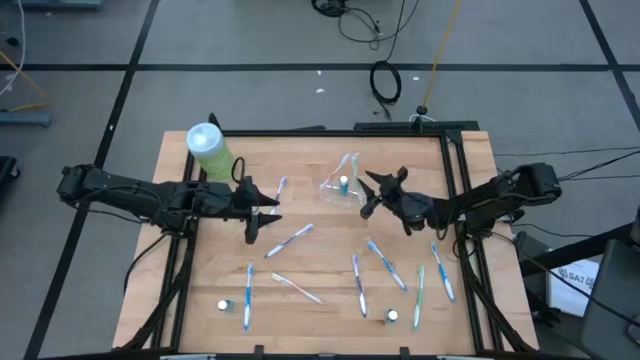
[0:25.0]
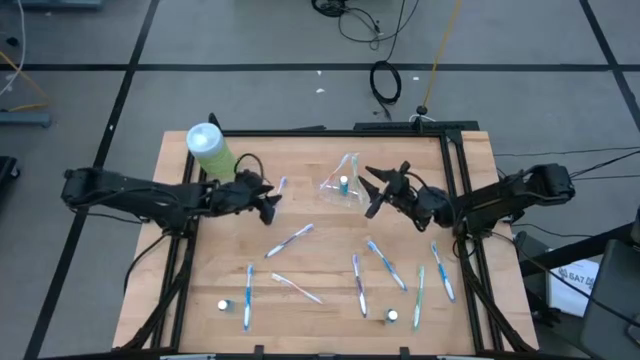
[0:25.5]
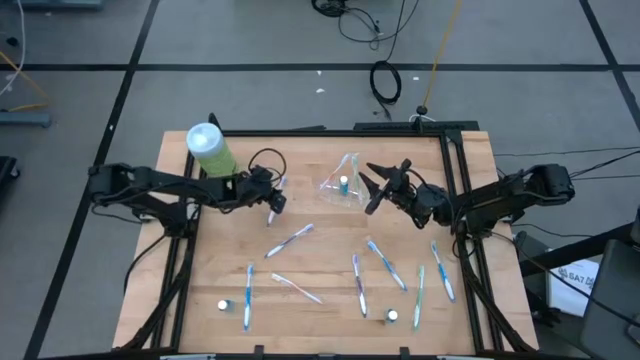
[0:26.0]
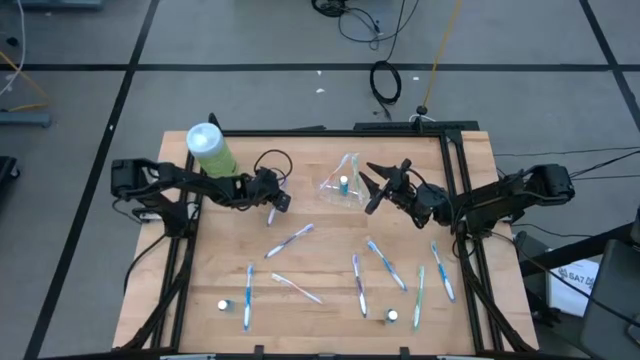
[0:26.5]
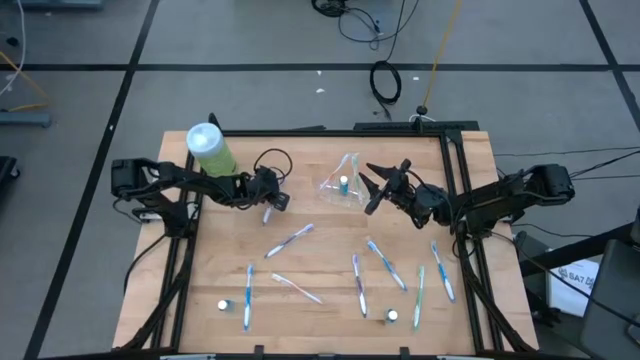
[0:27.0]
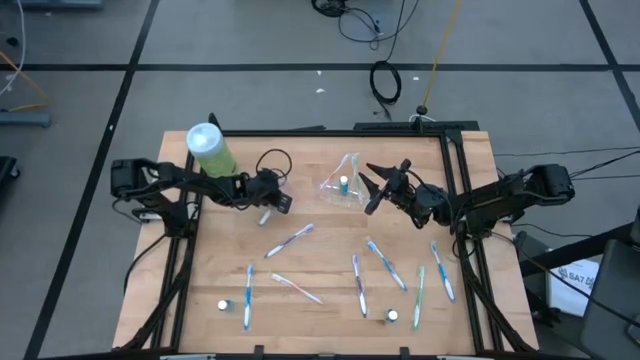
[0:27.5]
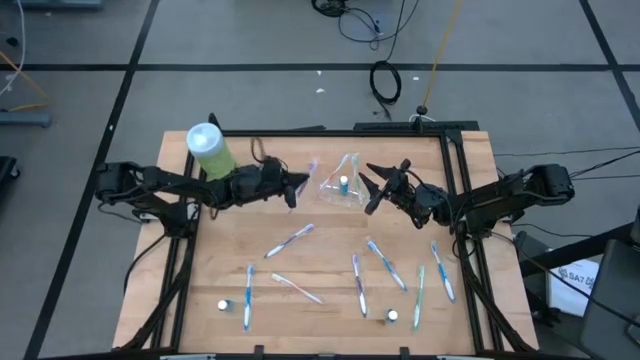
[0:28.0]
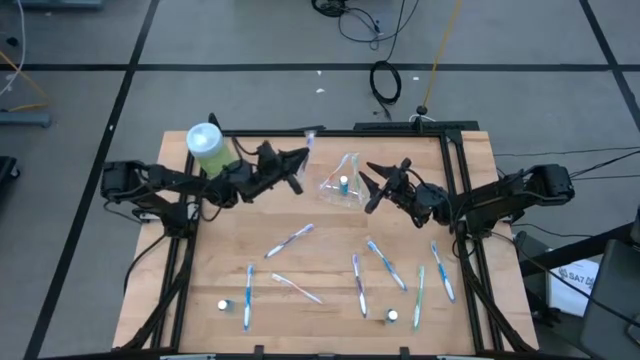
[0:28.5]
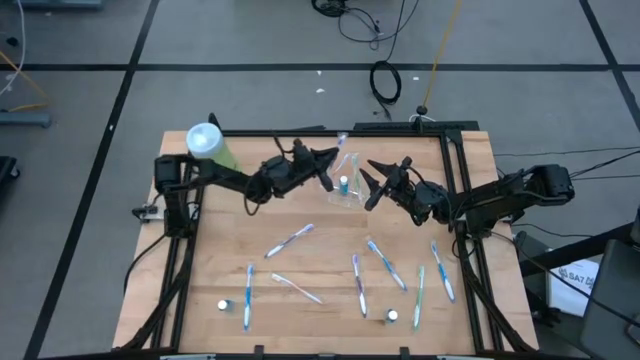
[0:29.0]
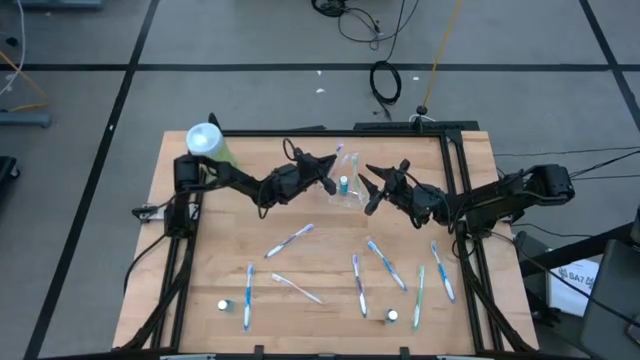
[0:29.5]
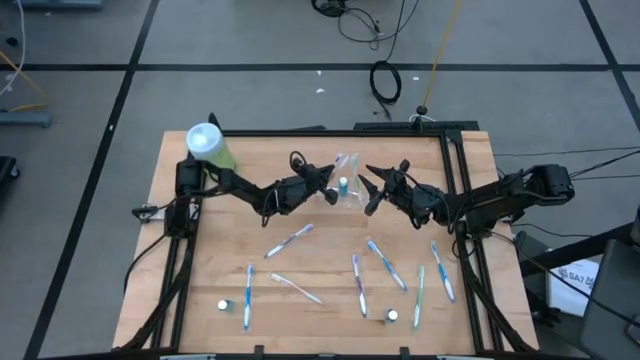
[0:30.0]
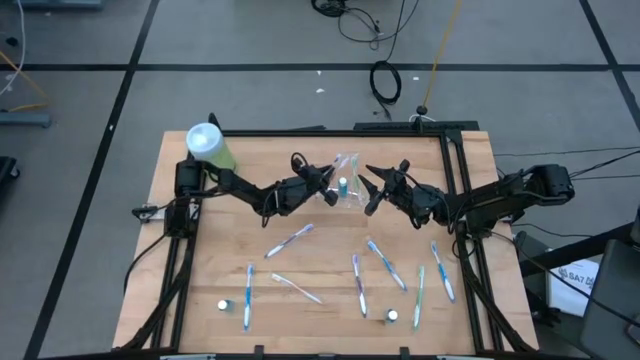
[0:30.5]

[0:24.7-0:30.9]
Task: Pick & Place toothbrushing station
Put the top violet toothbrush into the transparent organizer

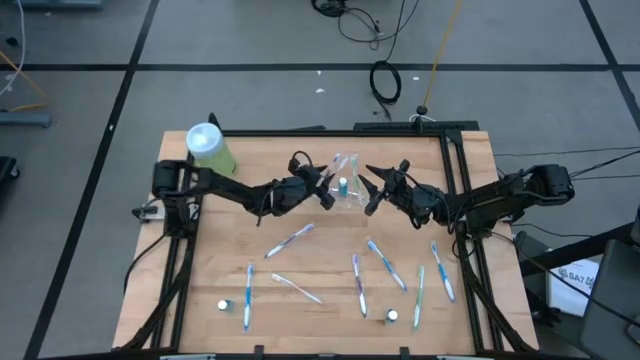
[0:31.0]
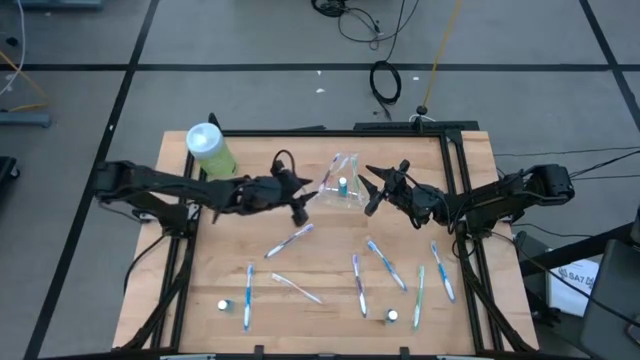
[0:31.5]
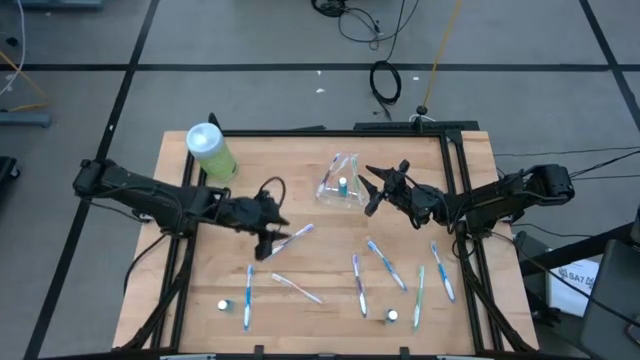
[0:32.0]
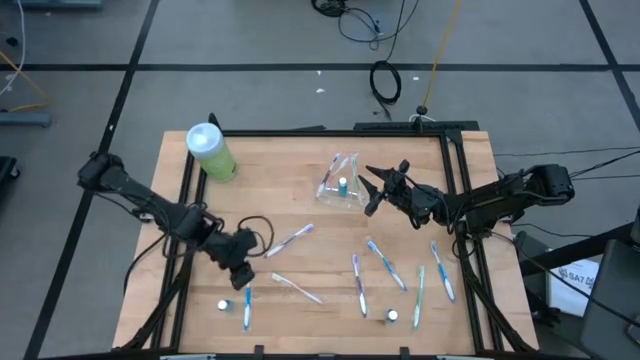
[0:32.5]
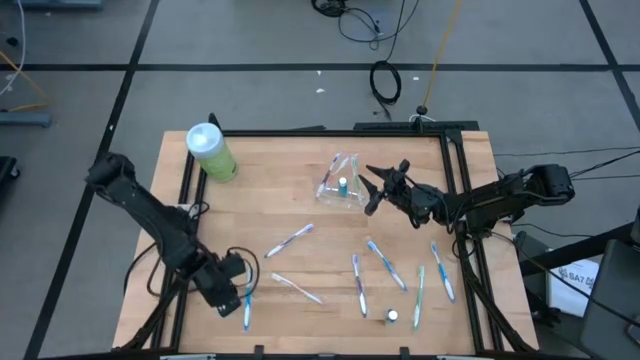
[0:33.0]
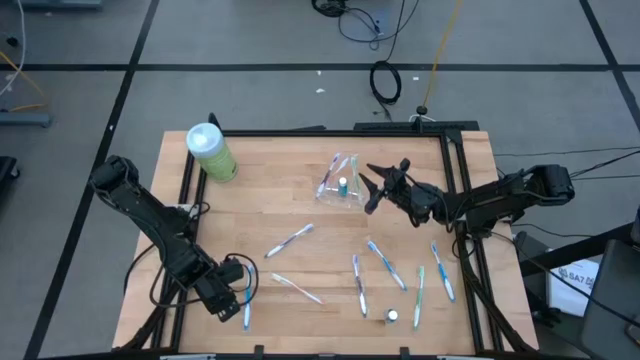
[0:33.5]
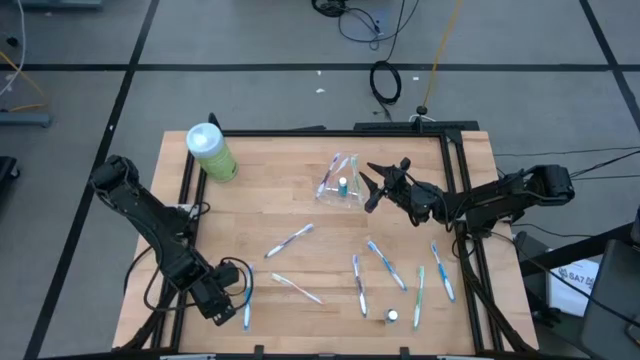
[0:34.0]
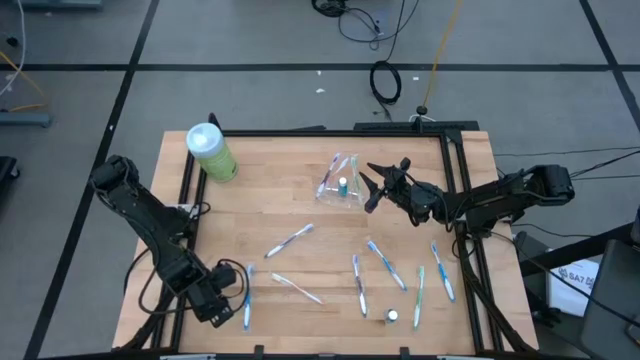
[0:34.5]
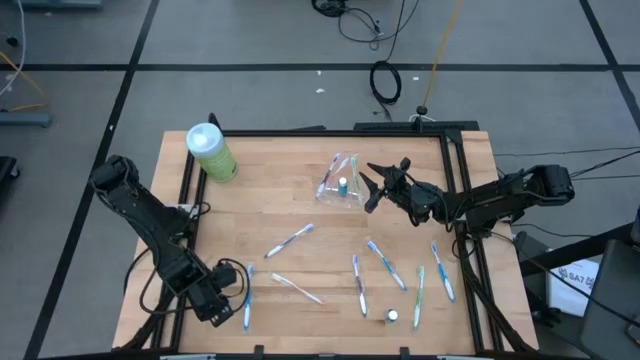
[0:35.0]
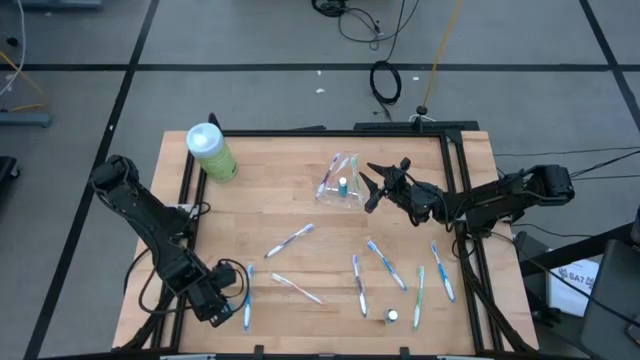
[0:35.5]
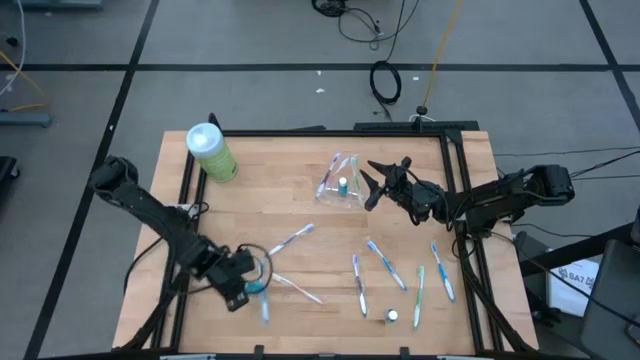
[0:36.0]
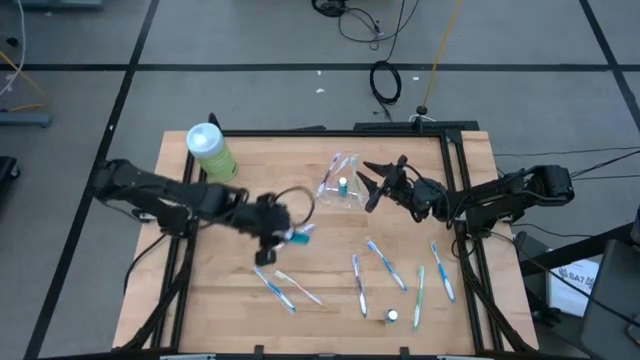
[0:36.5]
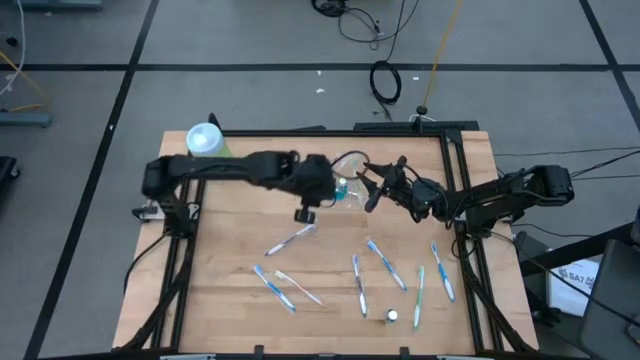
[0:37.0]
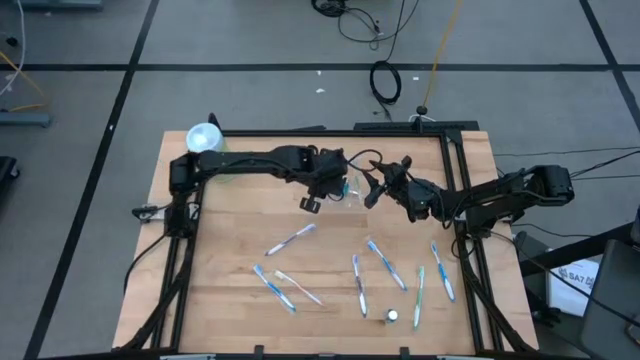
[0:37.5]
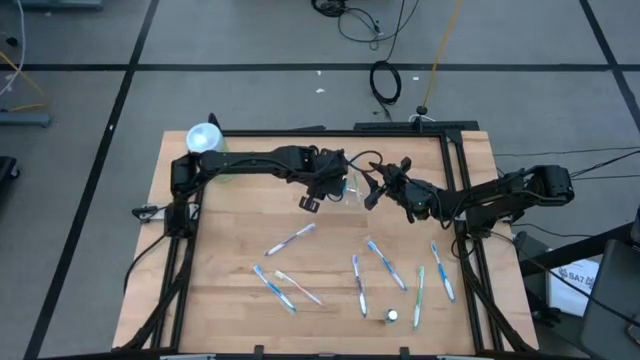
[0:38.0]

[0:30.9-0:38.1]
Put the left blue mouthwash into the transparent organizer

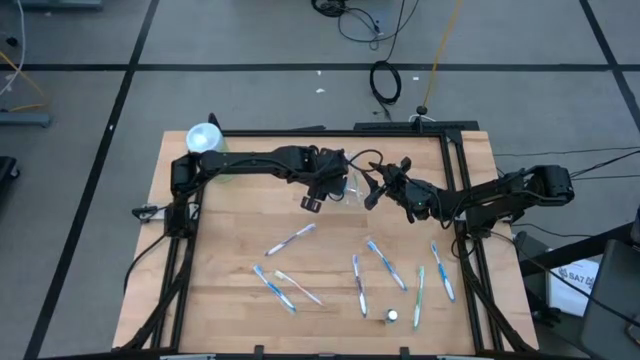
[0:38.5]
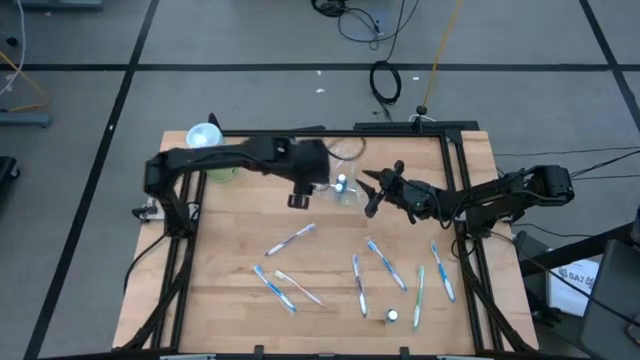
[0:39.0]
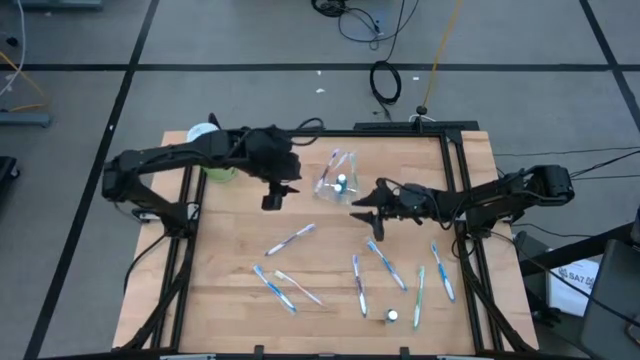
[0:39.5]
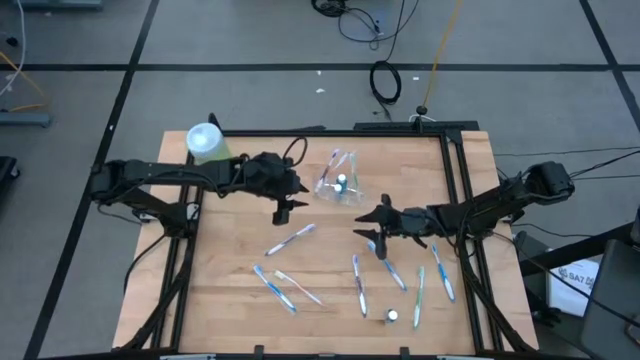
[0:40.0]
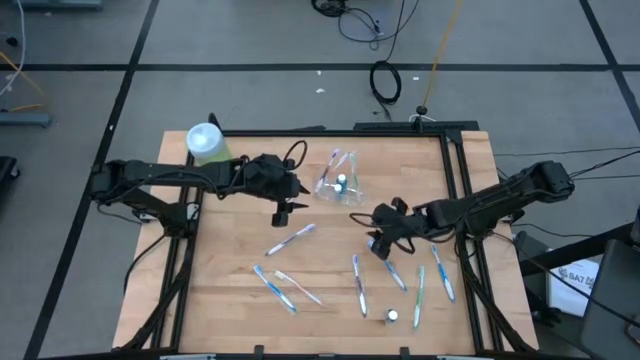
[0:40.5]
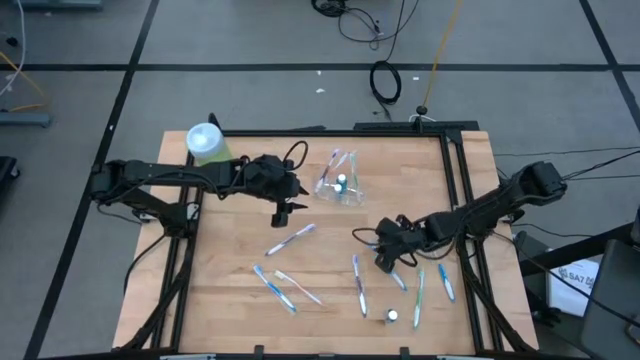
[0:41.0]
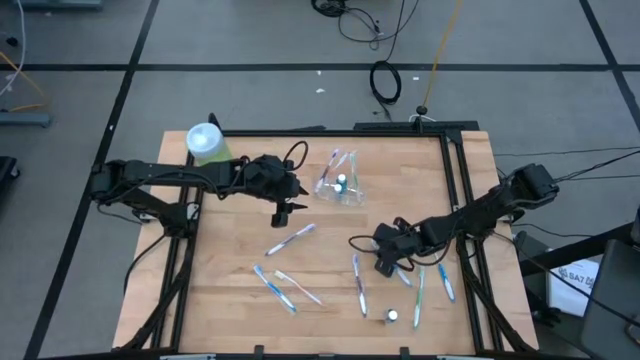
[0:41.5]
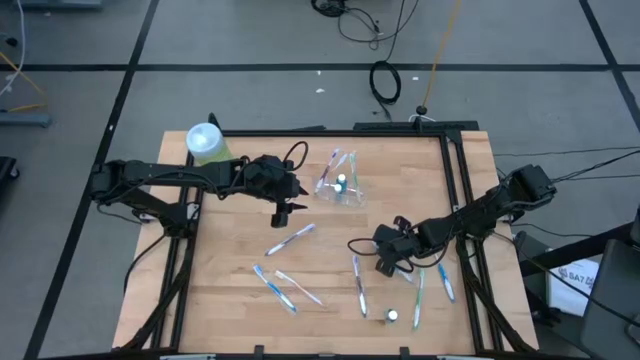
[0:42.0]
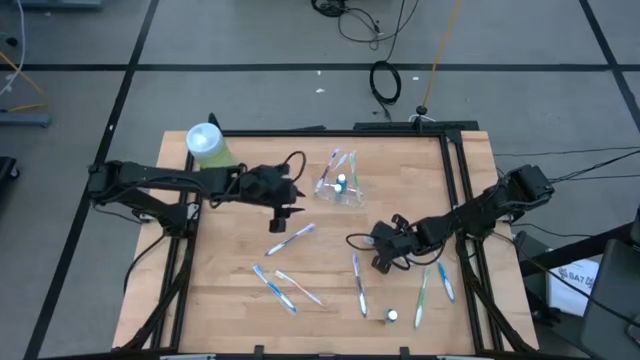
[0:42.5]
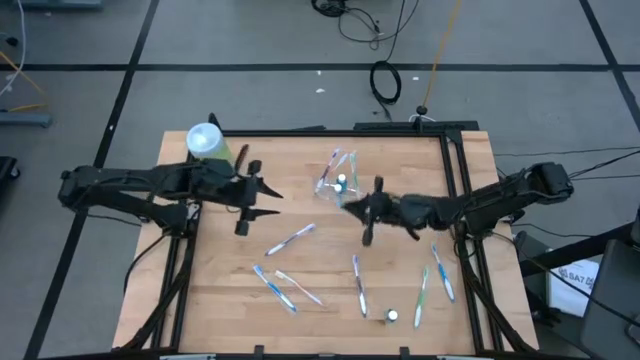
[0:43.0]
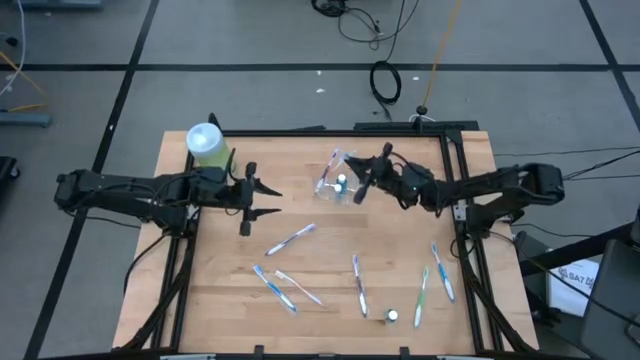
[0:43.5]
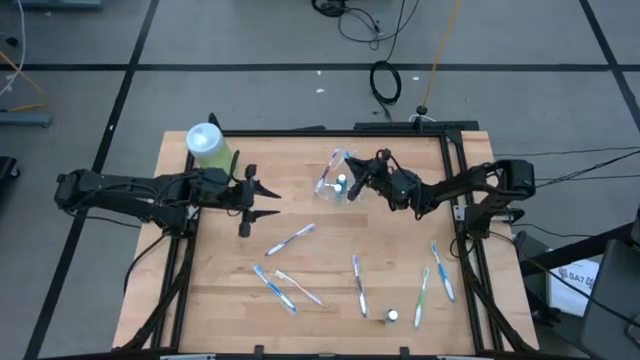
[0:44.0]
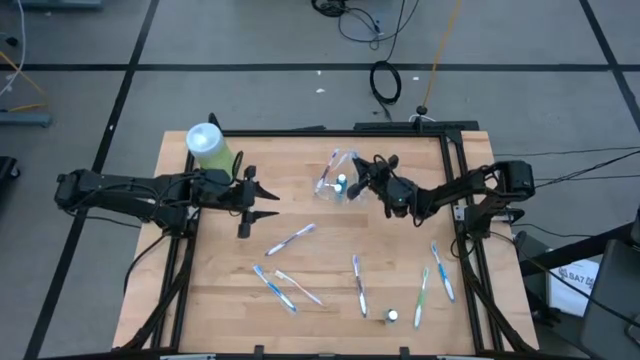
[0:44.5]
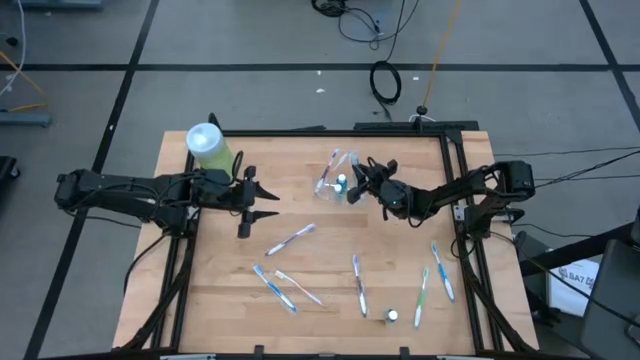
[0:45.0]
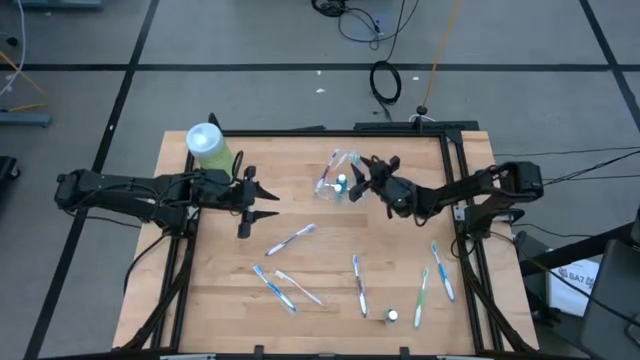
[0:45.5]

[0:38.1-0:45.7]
Put the middle blue toothbrush into the transparent organizer
